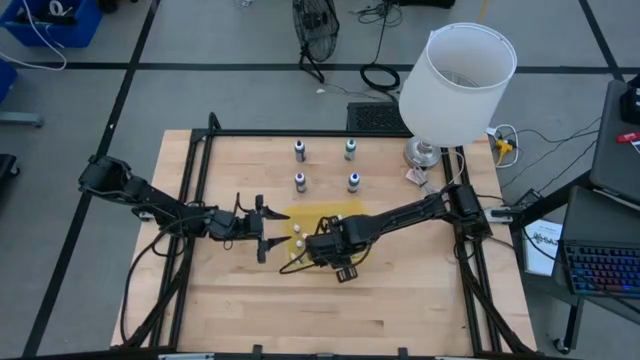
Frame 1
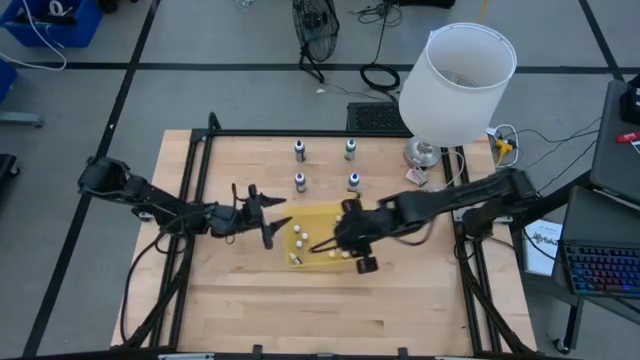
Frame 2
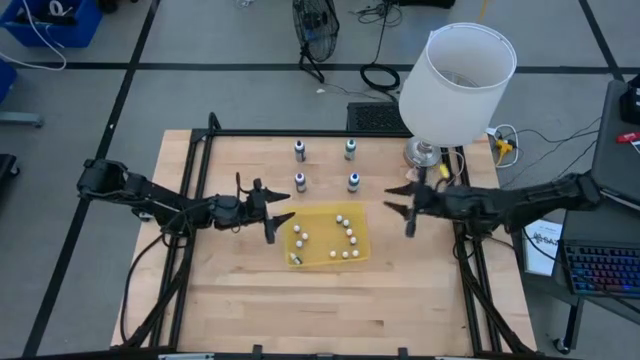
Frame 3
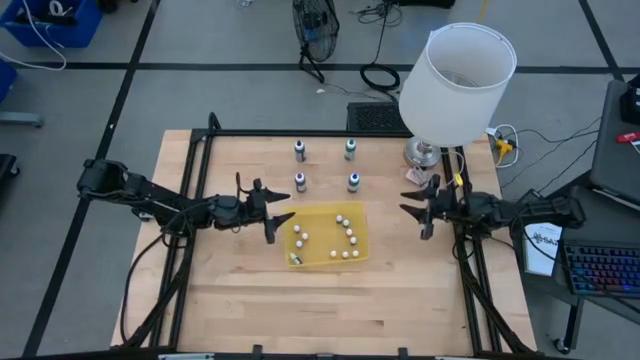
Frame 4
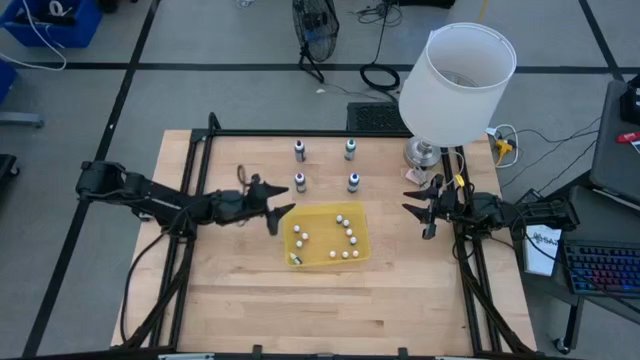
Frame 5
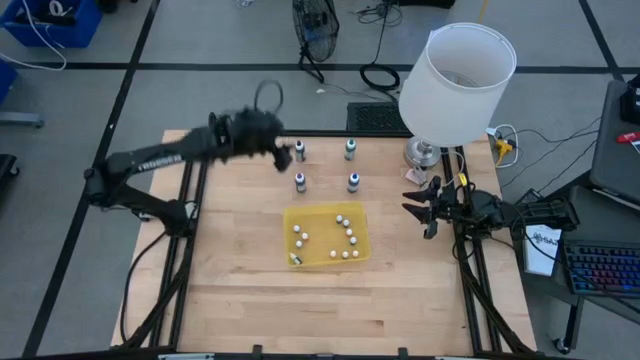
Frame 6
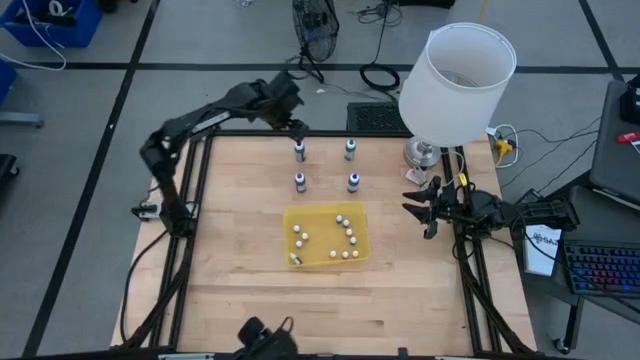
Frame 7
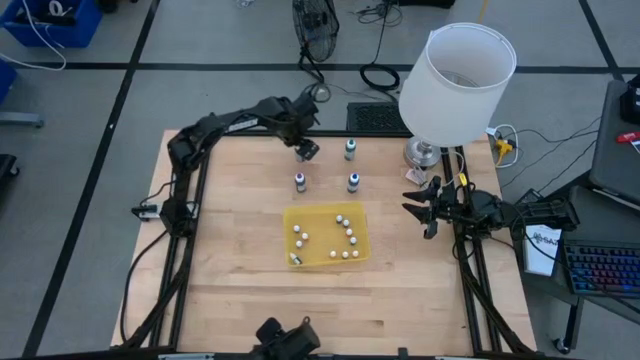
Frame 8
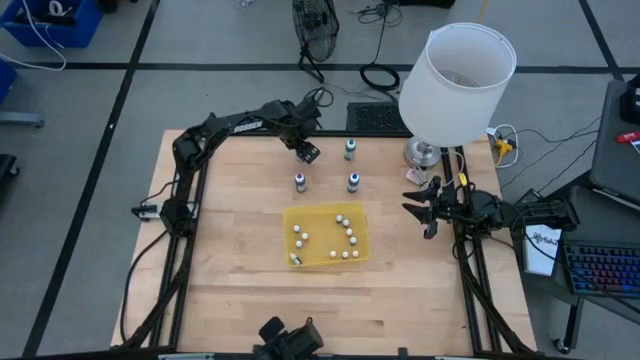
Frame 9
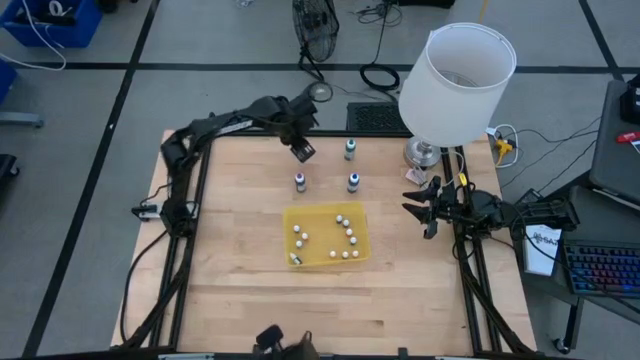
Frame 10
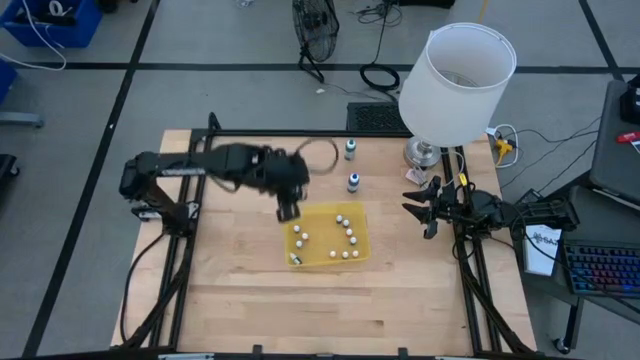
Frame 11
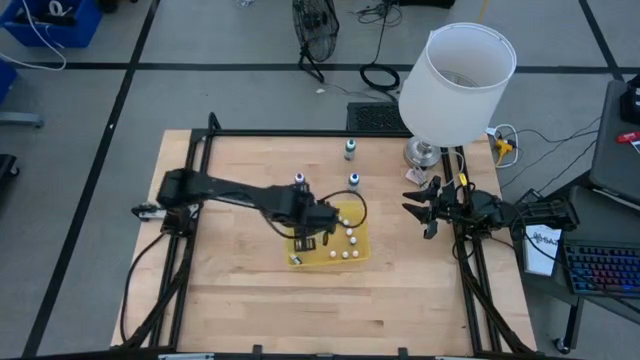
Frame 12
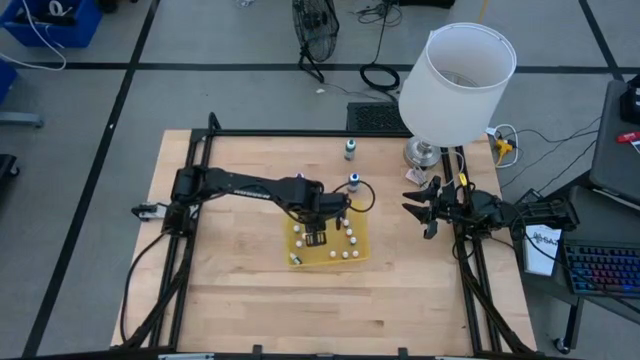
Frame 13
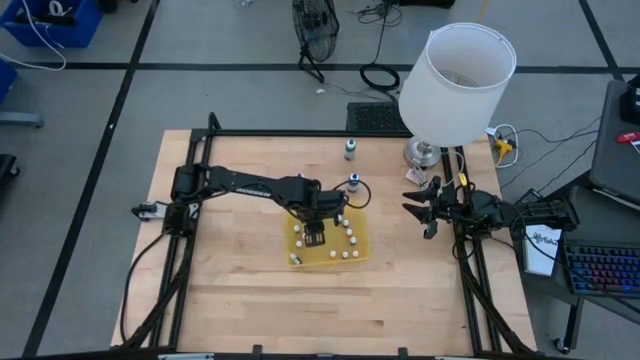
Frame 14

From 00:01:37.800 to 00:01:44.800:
Task: Pick & Place food coloring
Put the big black food coloring bottle into the yellow container

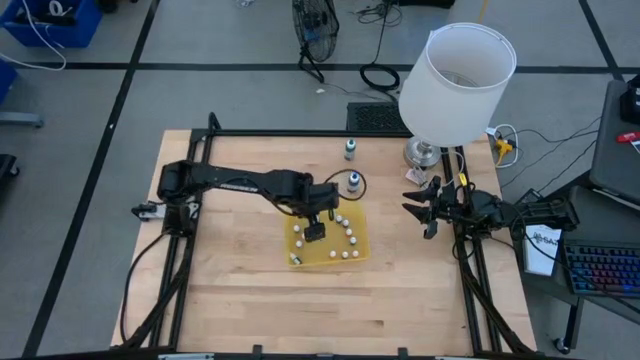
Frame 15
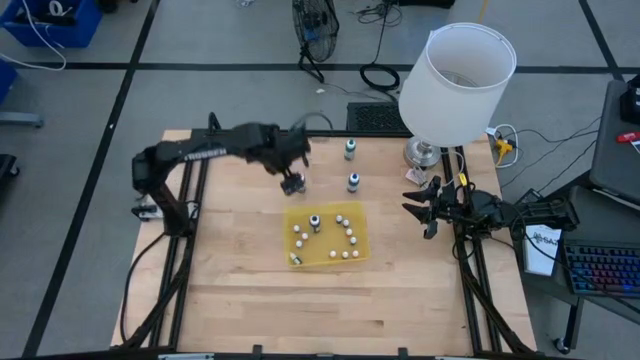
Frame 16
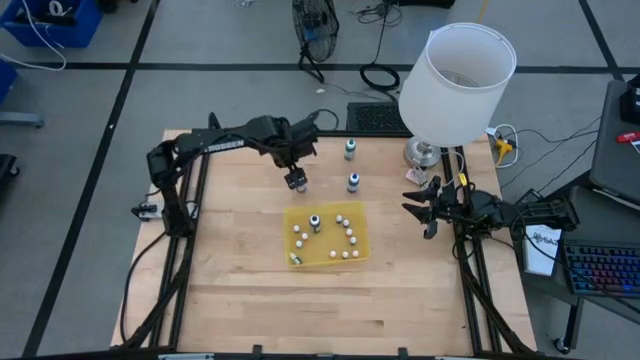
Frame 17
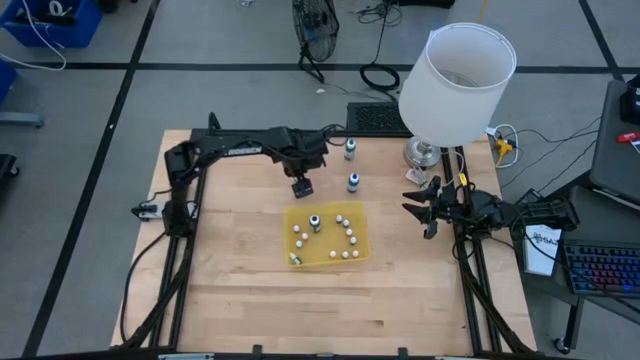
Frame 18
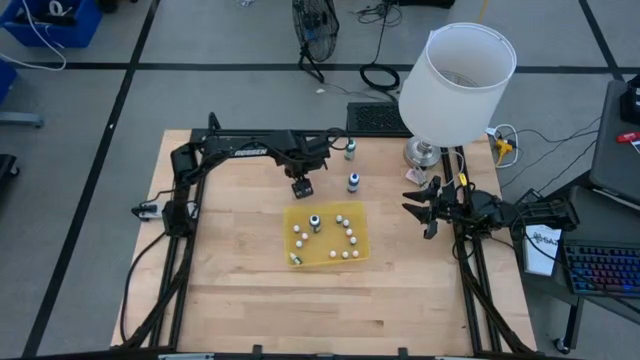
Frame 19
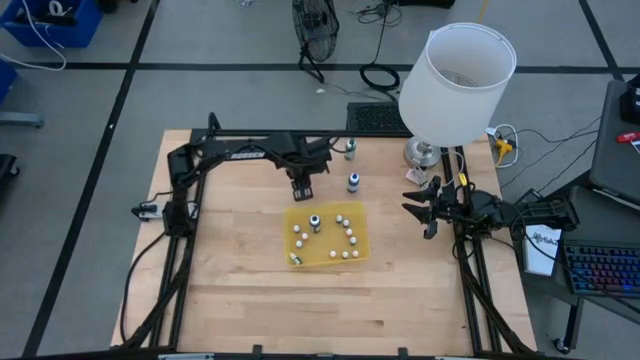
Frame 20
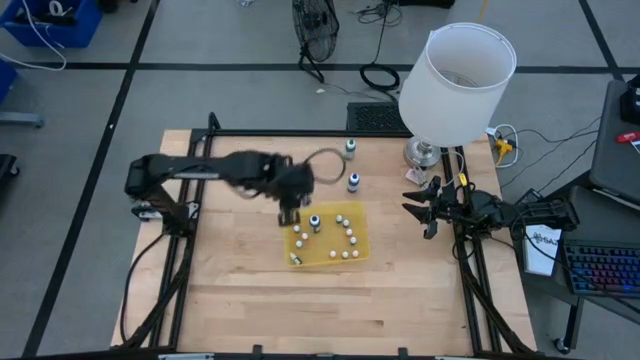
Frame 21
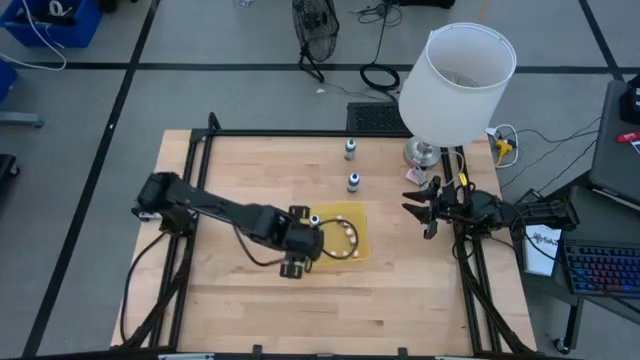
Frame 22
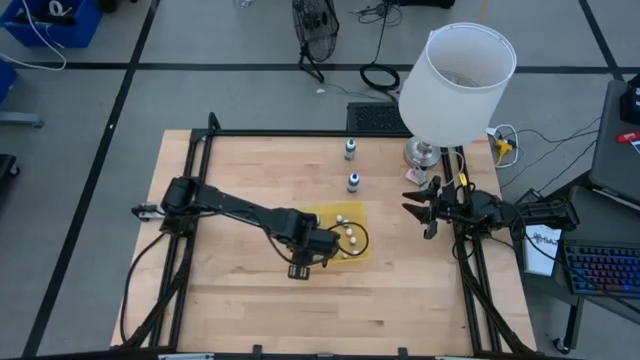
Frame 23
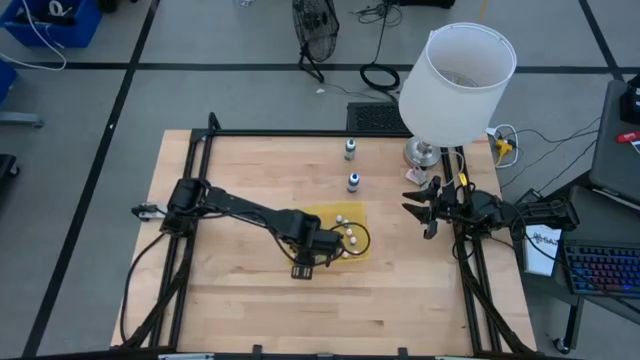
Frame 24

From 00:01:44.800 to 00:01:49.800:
Put the big violet food coloring bottle into the yellow container

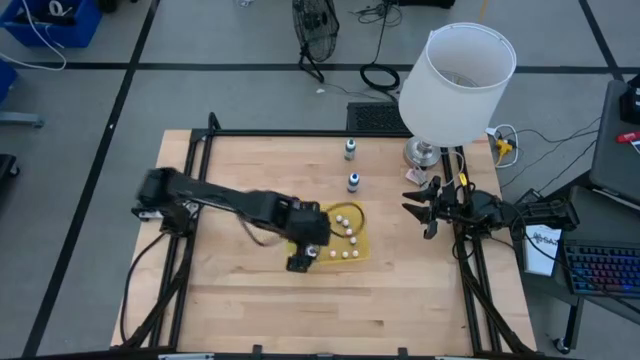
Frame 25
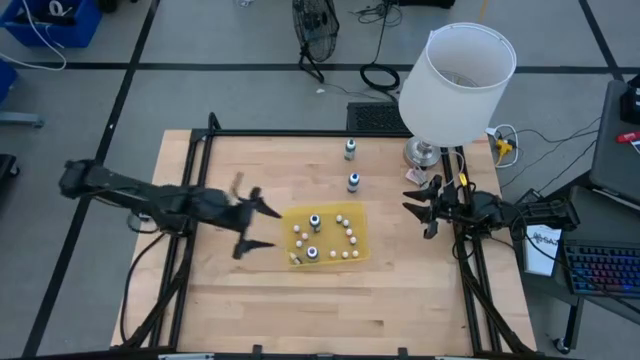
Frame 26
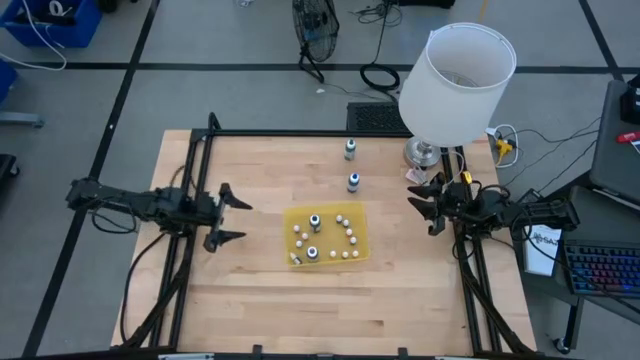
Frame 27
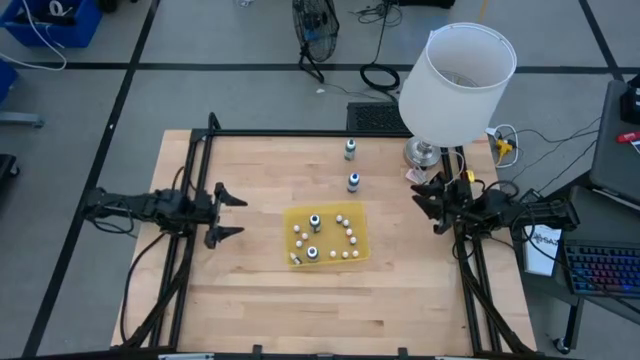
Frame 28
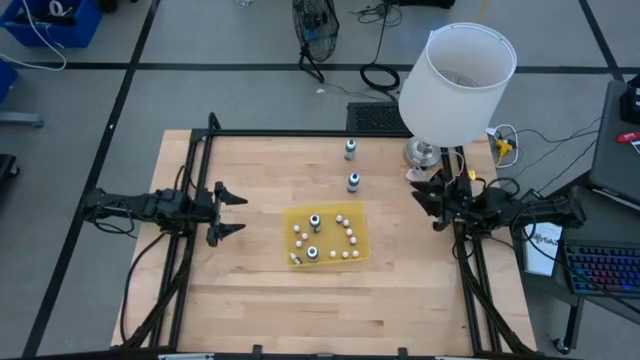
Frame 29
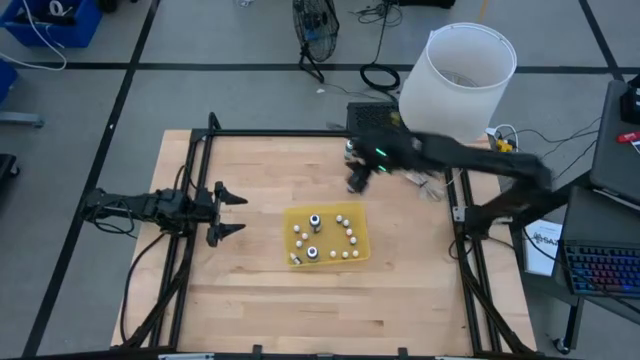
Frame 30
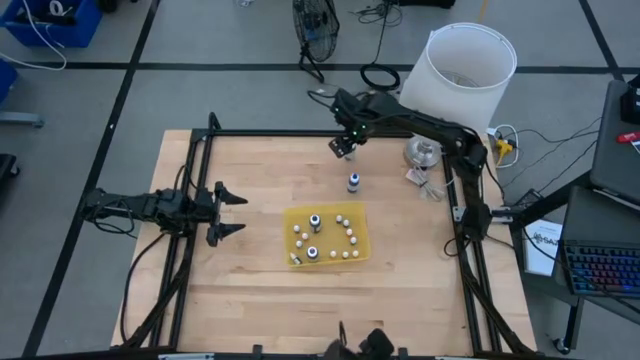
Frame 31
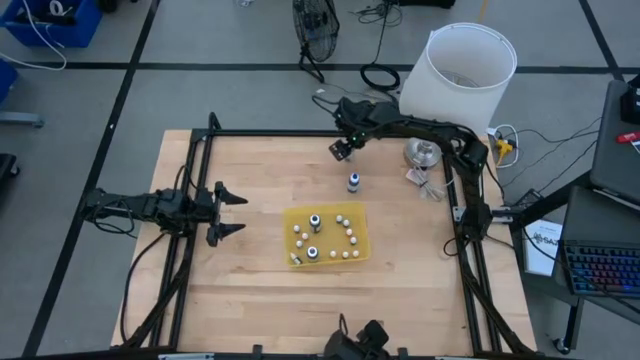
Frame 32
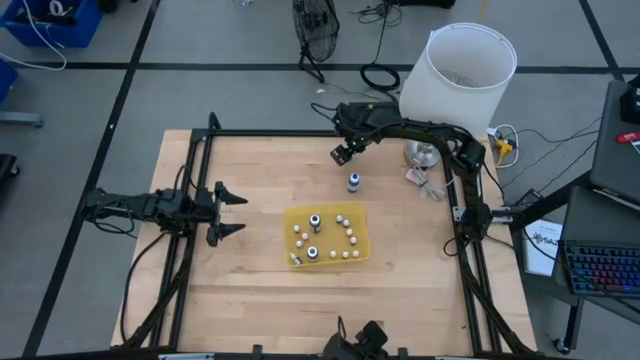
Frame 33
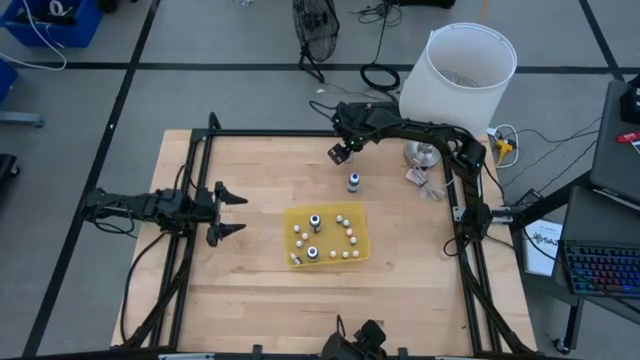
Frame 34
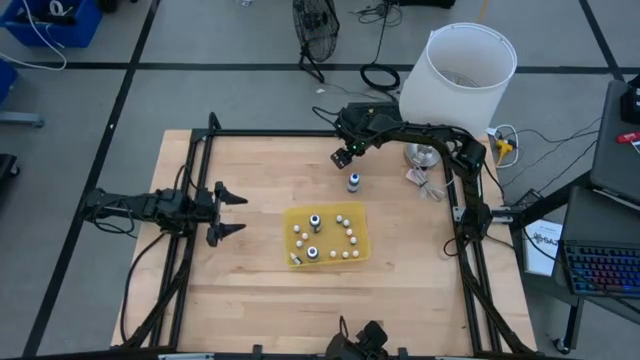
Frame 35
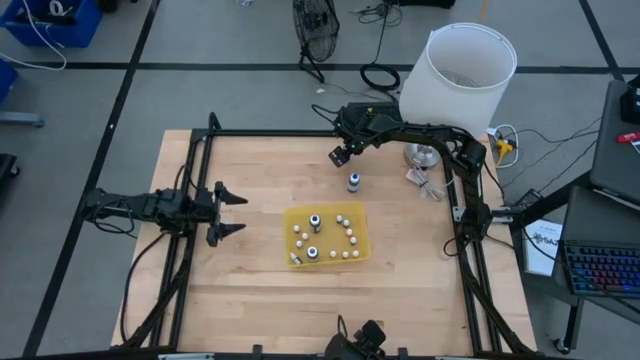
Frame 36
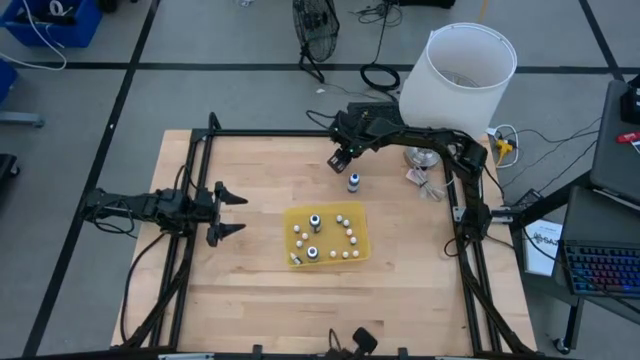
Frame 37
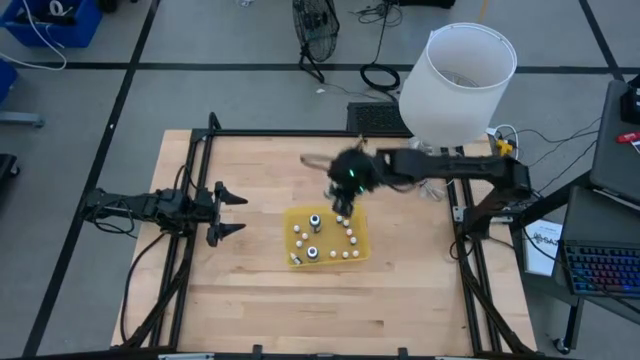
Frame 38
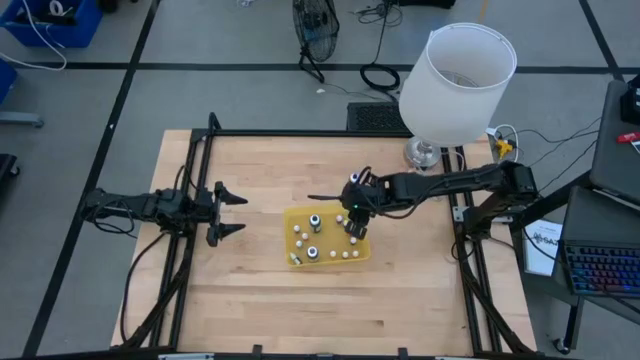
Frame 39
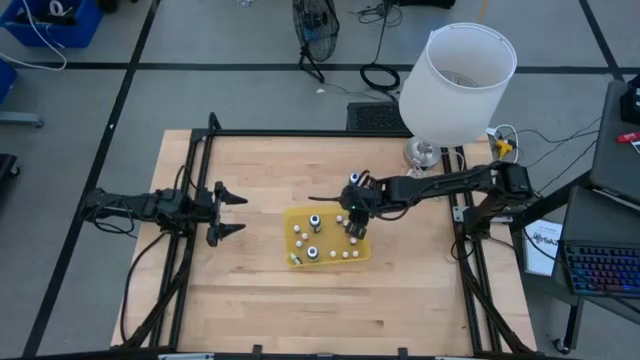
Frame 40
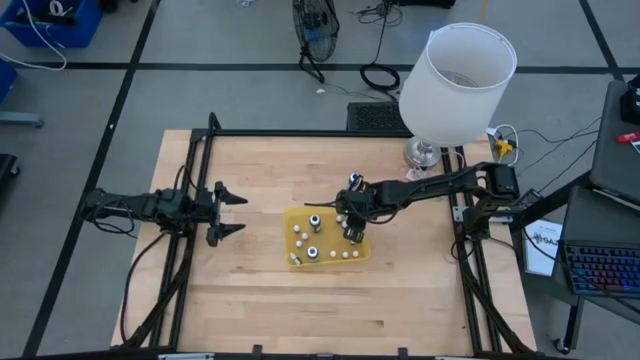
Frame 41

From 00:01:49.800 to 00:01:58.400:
Put the big green food coloring bottle into the yellow container

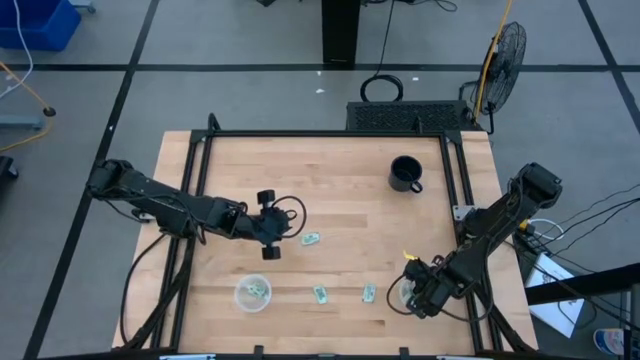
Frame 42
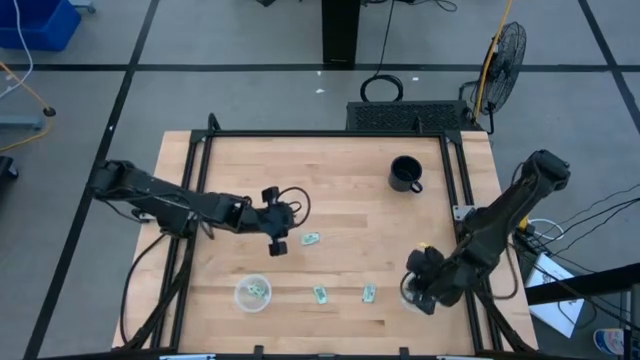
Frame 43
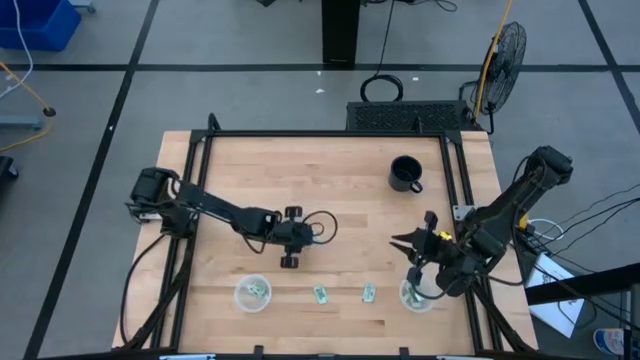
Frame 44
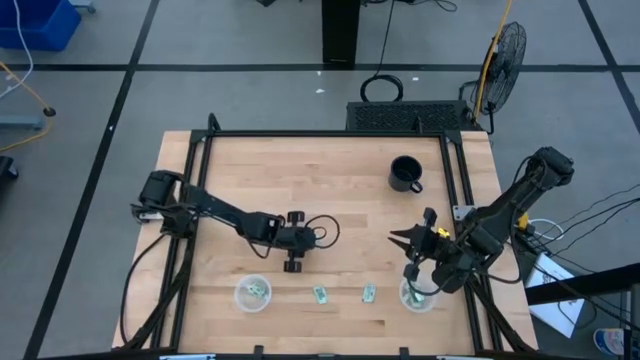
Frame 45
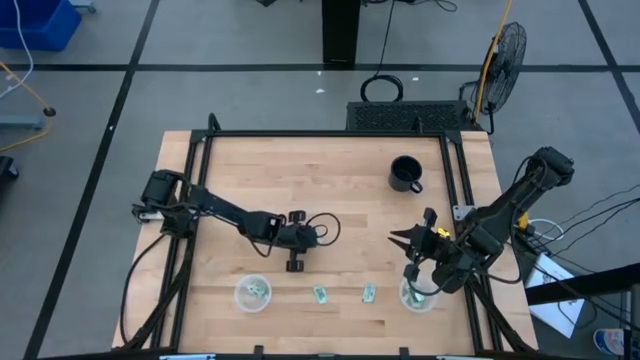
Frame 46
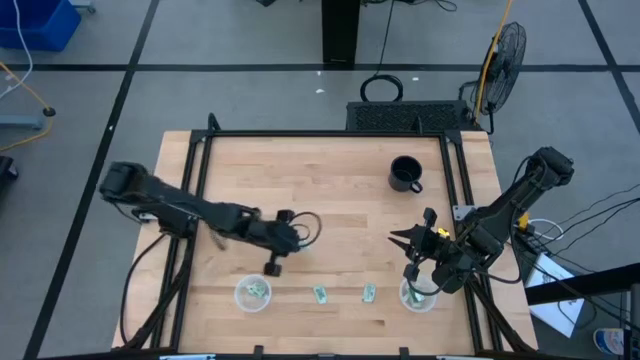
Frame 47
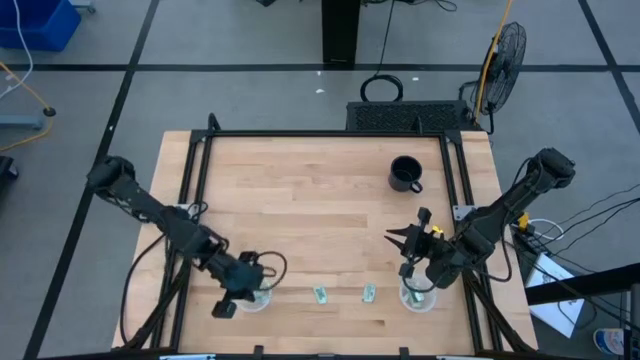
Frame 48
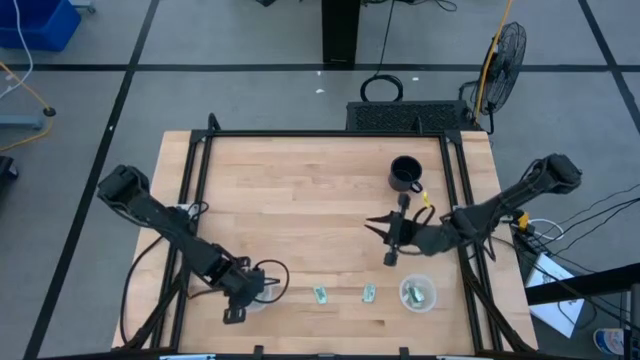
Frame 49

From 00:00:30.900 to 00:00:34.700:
Task: Pick and place Stevia / Truvia into bins
Put the stevia packet into the left transparent container
